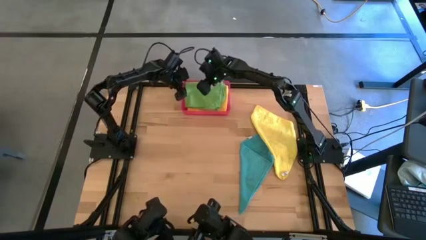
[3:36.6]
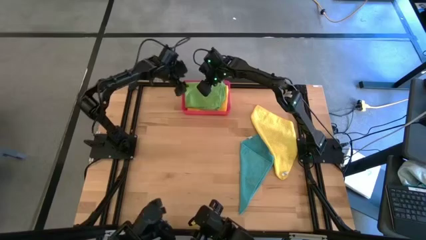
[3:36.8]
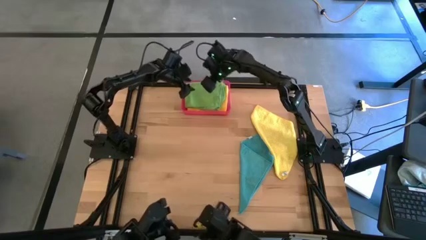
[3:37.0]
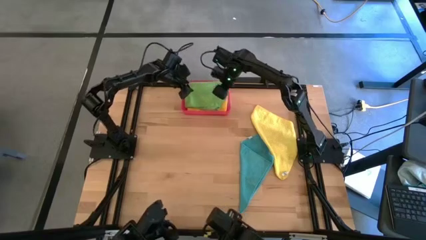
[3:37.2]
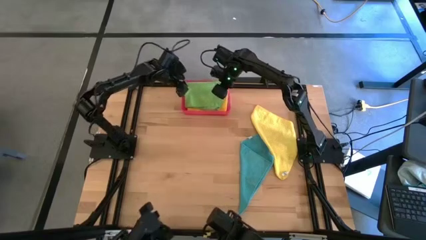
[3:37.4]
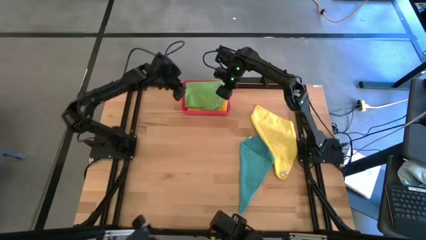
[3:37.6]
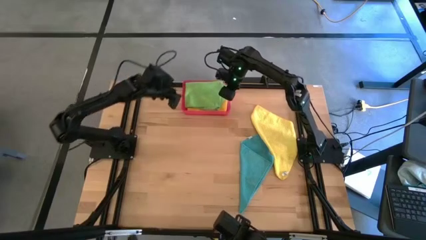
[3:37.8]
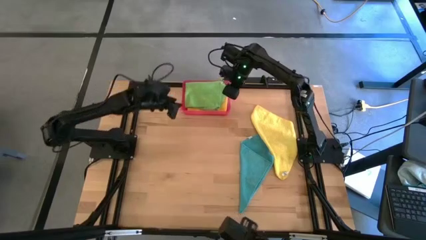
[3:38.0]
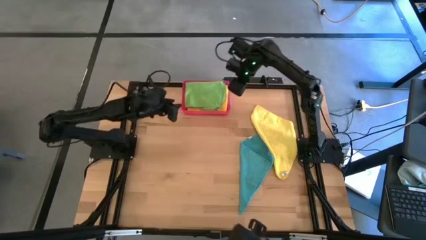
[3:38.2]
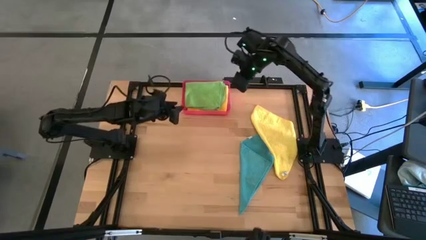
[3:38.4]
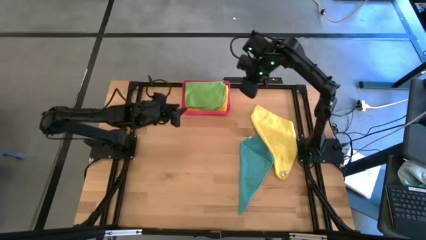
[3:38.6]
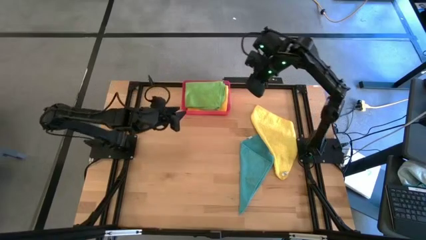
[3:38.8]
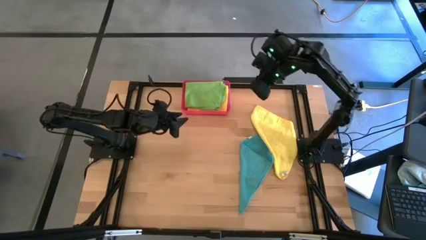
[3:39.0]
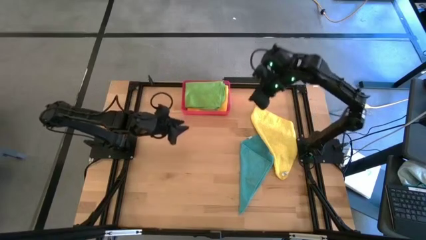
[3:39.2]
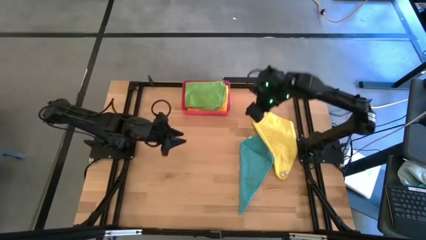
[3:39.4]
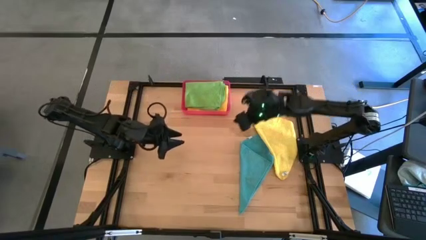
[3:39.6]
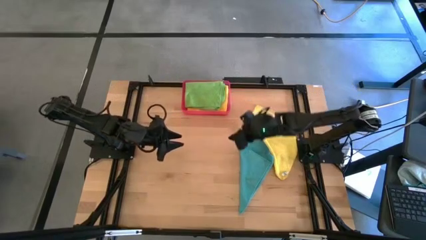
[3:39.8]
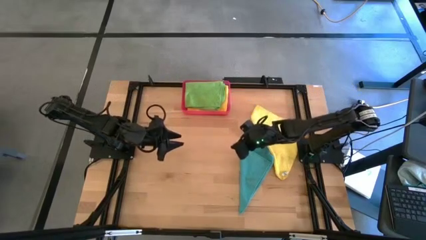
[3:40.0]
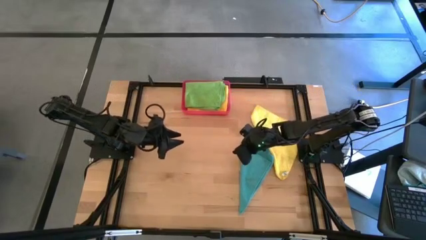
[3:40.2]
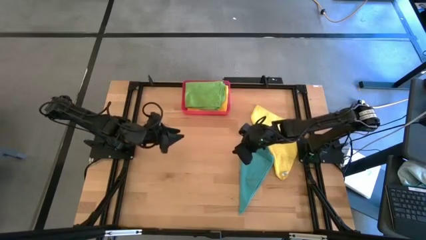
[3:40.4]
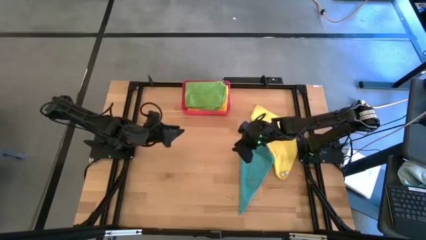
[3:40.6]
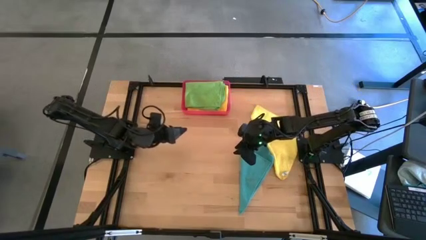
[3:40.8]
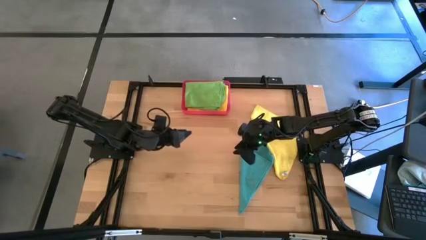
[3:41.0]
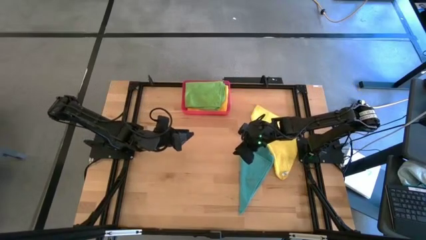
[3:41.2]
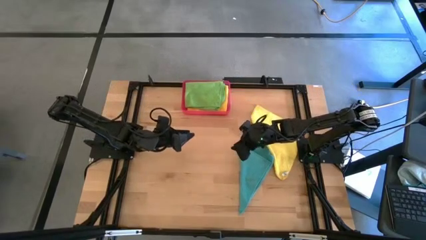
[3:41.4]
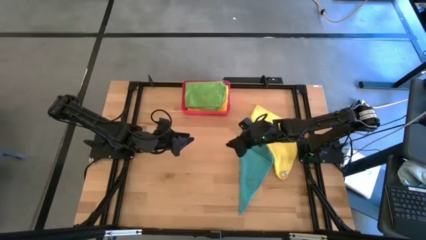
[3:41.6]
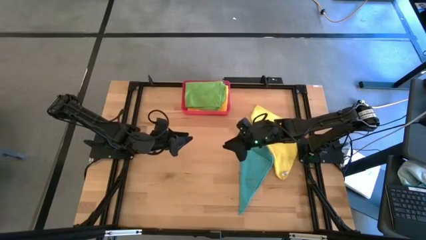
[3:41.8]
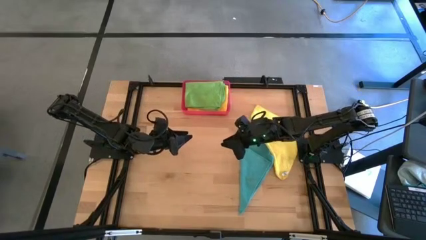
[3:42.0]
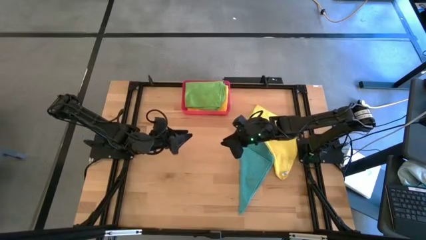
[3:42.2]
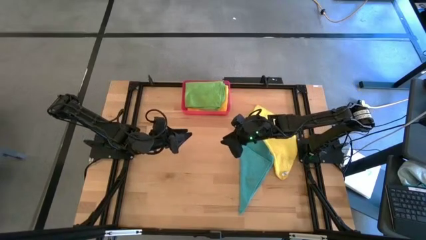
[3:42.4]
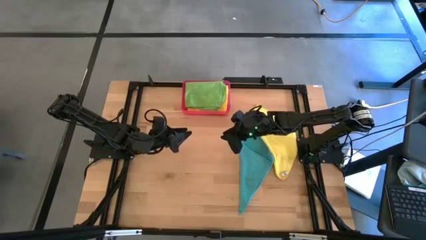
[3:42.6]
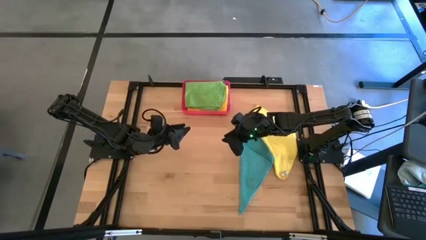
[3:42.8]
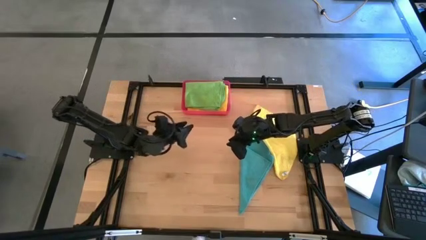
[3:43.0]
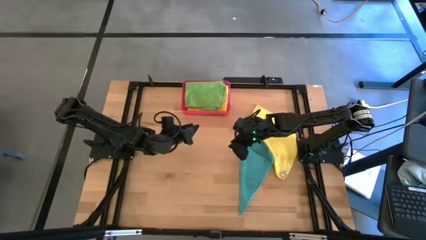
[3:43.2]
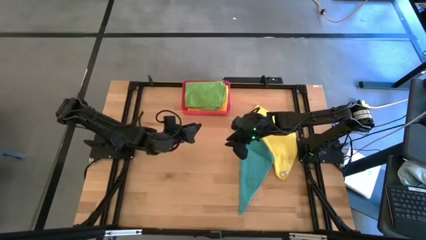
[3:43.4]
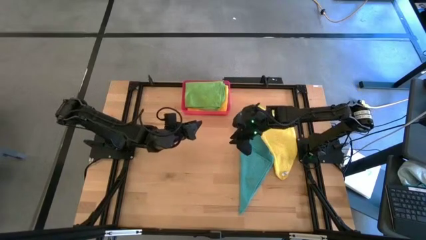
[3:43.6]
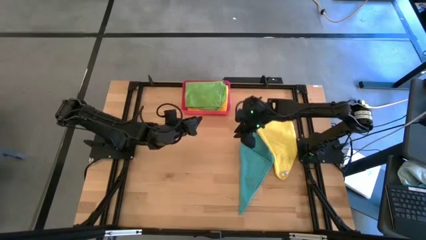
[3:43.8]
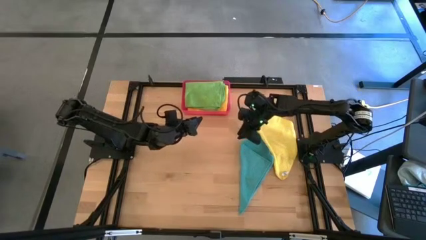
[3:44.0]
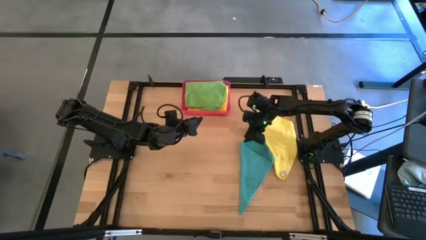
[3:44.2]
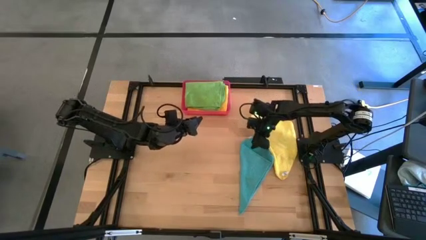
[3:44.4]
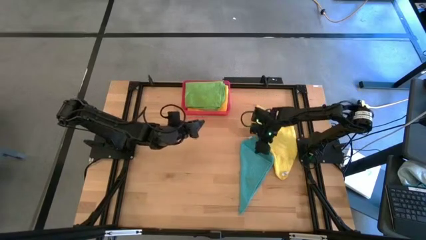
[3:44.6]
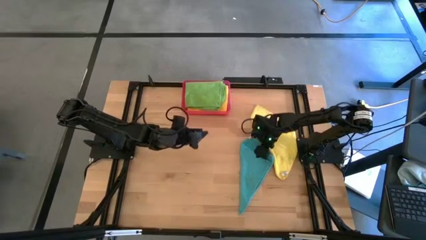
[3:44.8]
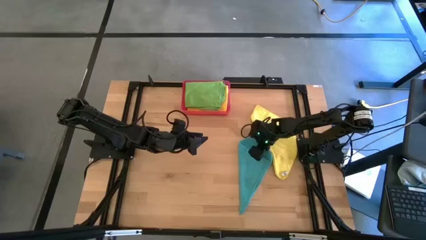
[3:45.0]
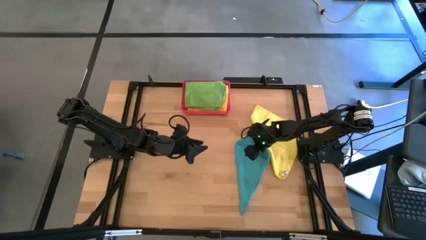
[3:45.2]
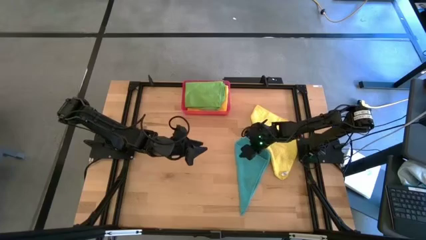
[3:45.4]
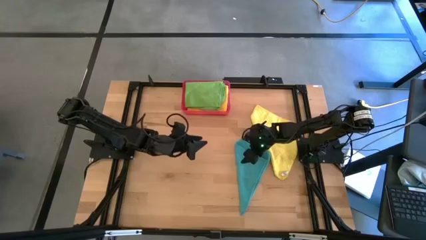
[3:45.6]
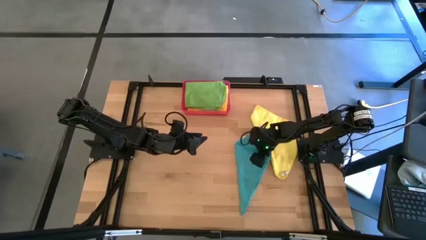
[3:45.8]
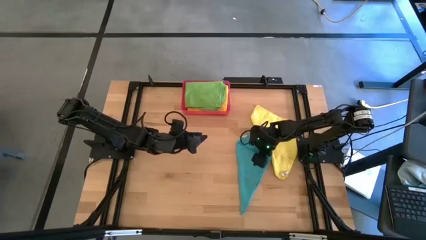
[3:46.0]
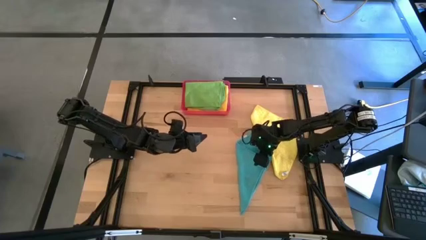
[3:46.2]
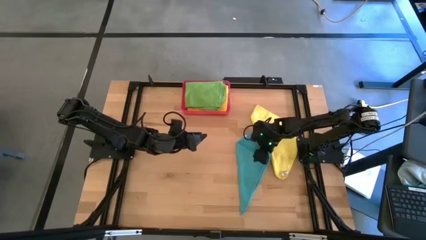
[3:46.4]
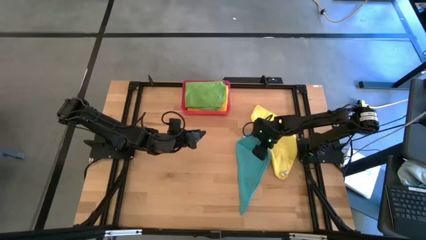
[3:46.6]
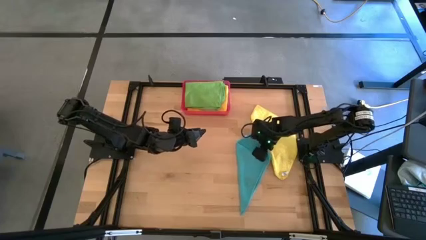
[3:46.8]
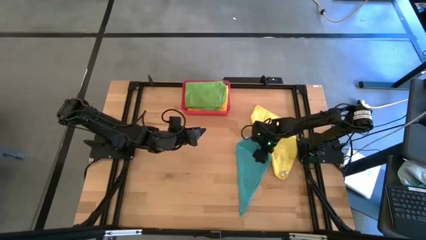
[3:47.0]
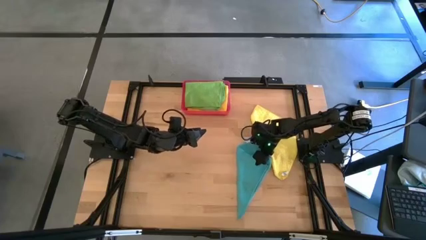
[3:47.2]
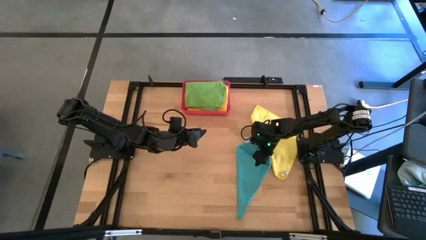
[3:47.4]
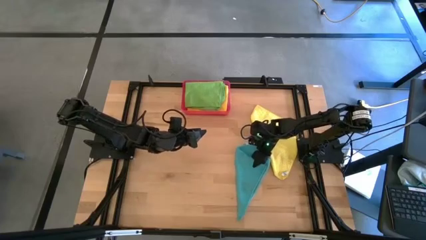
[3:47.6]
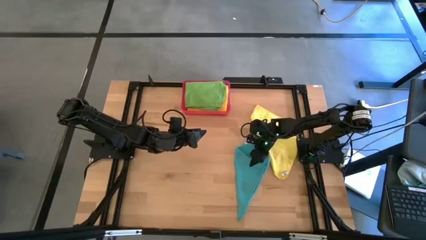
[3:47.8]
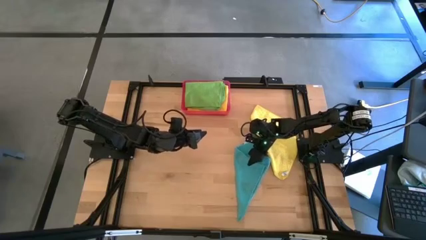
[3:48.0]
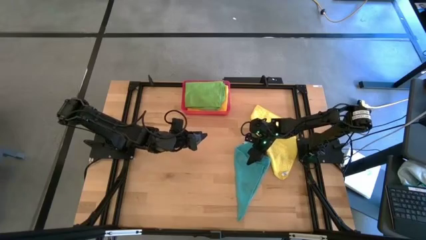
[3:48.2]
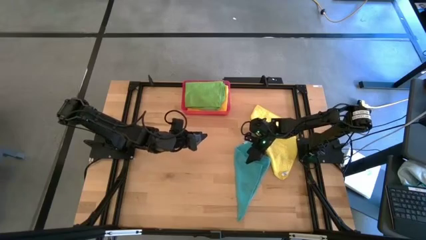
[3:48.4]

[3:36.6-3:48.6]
Task: Fold microfiber towels
Fold the blue microfiber cloth

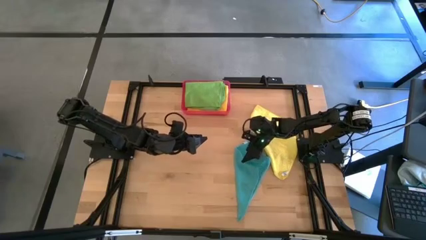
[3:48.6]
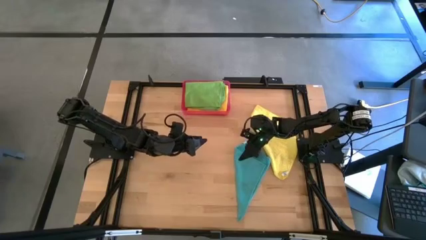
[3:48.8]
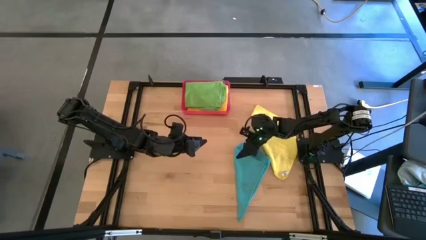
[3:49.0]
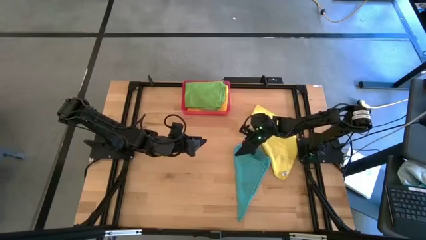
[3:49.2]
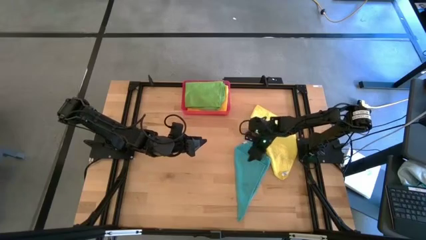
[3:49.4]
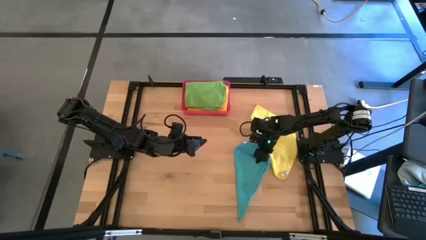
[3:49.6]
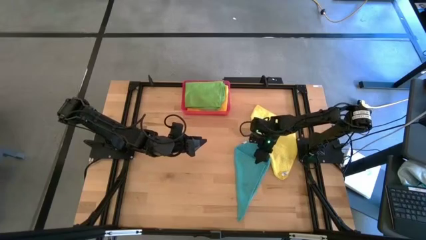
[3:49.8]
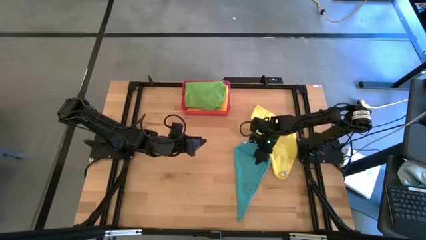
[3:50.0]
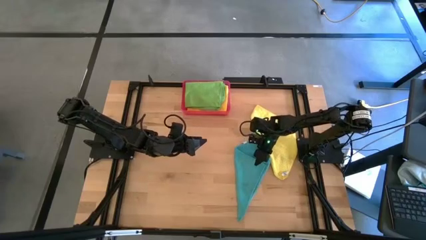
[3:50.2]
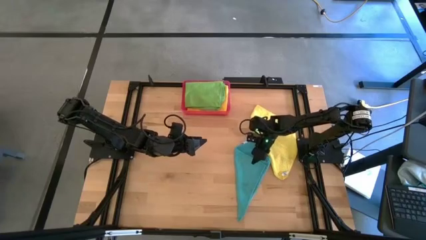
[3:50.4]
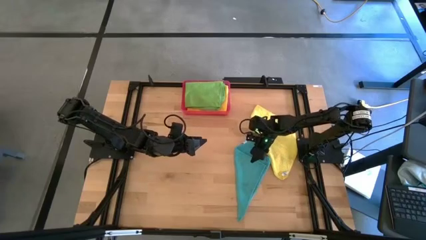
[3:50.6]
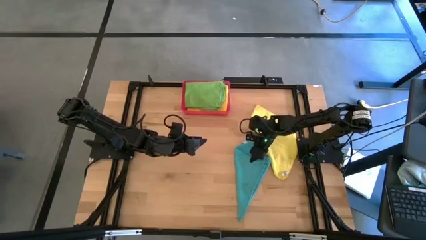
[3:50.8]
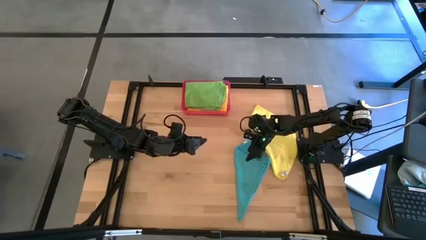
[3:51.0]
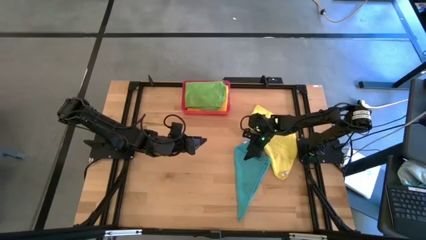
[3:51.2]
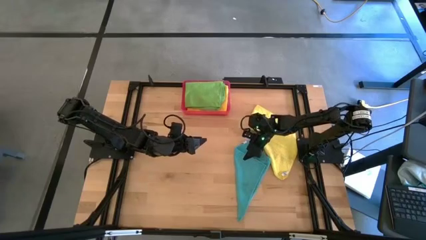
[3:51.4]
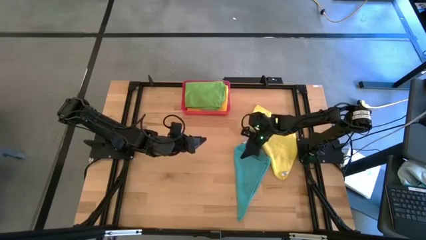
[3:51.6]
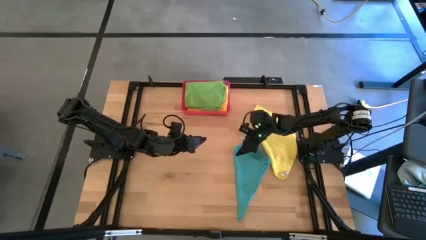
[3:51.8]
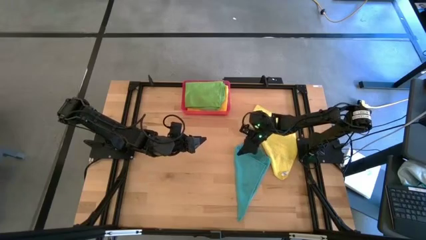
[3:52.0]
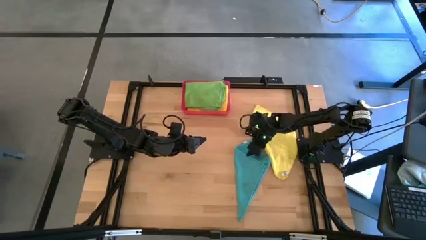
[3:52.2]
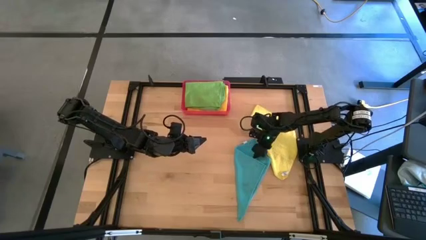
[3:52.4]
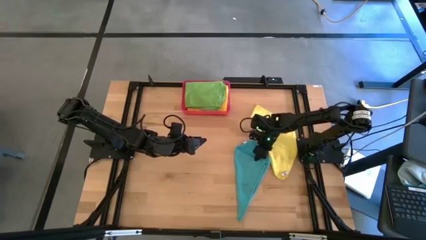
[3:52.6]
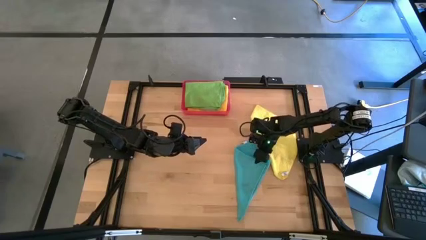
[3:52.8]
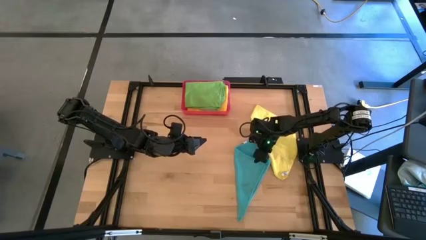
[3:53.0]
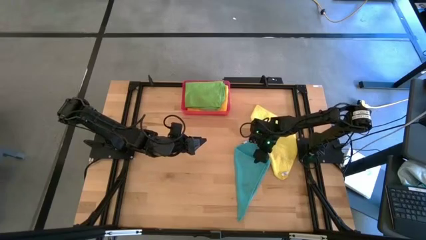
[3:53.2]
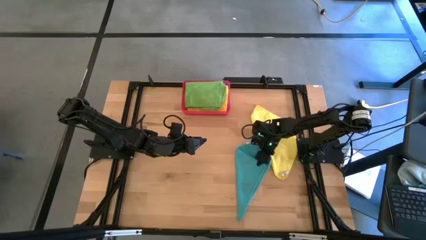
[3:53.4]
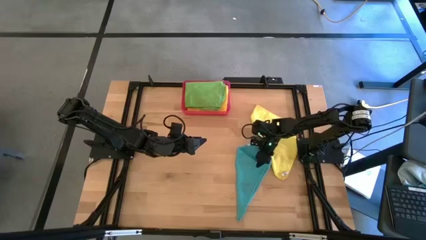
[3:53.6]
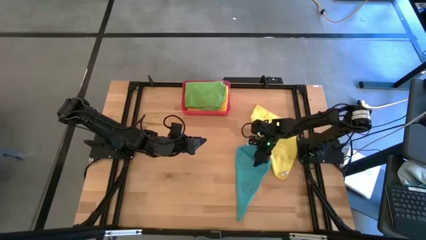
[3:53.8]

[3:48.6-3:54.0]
Fold the blue microfiber cloth
